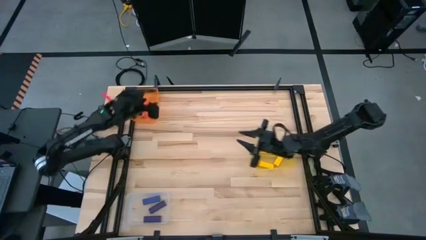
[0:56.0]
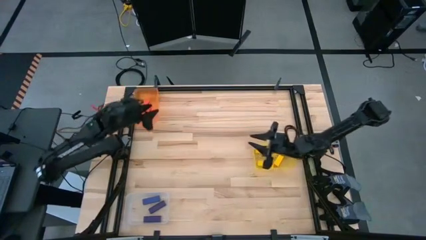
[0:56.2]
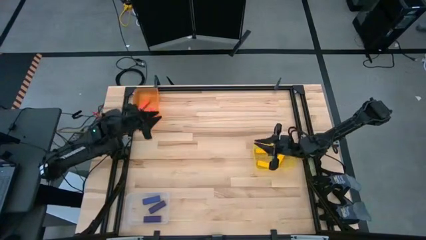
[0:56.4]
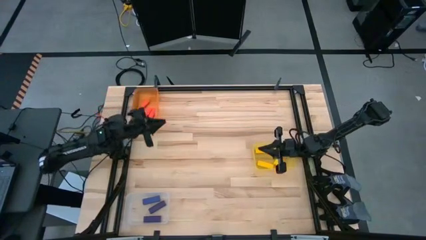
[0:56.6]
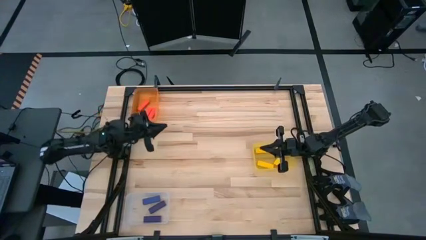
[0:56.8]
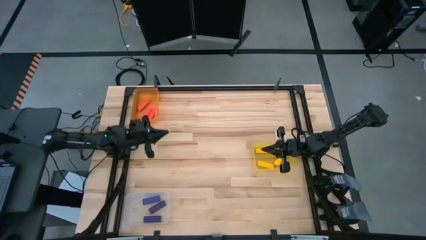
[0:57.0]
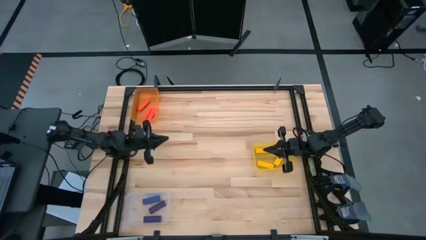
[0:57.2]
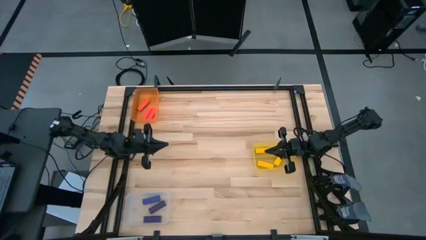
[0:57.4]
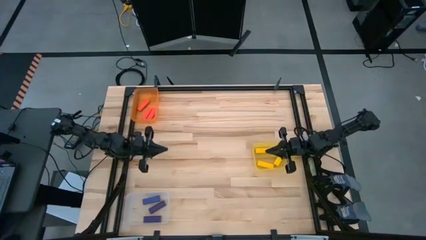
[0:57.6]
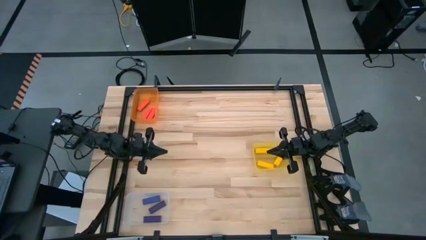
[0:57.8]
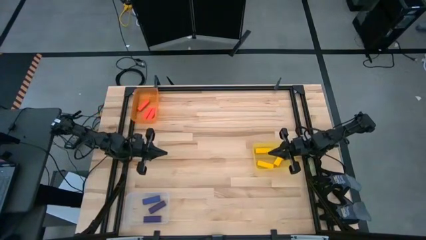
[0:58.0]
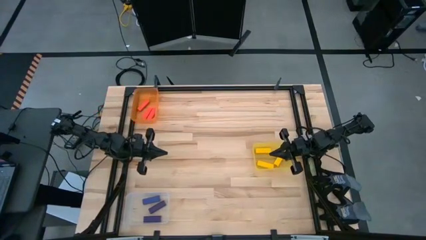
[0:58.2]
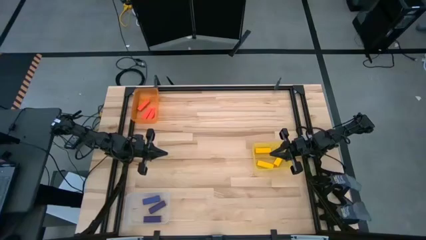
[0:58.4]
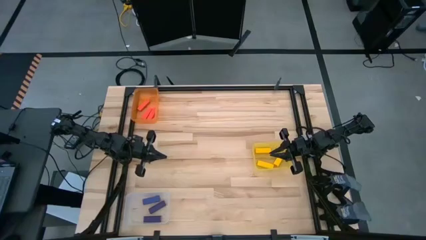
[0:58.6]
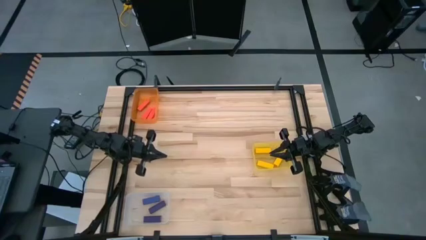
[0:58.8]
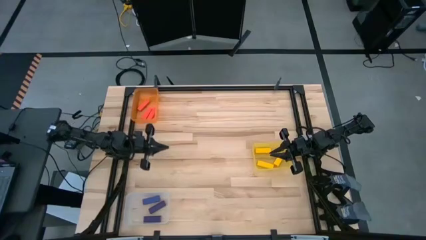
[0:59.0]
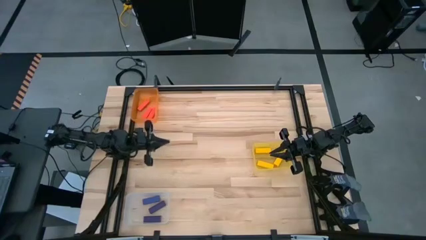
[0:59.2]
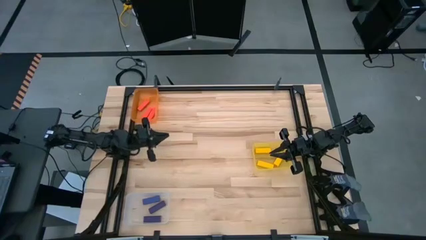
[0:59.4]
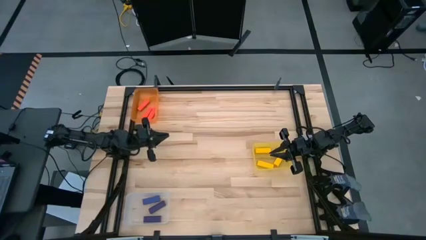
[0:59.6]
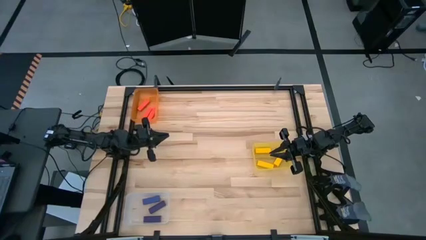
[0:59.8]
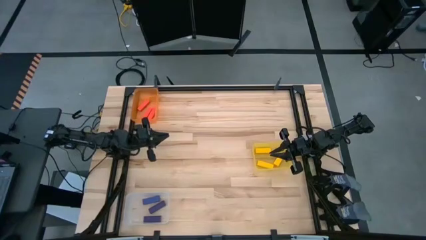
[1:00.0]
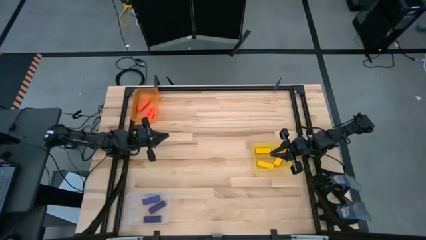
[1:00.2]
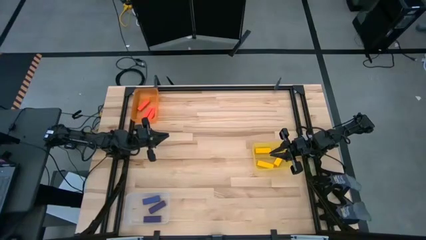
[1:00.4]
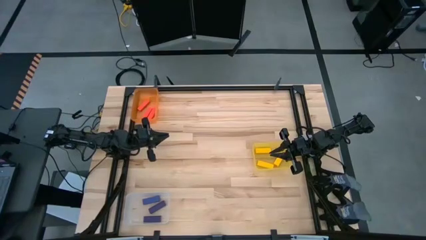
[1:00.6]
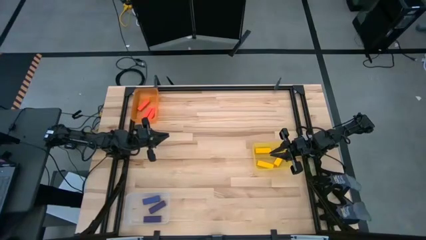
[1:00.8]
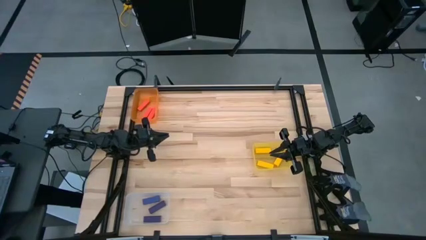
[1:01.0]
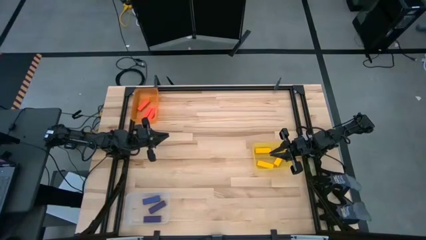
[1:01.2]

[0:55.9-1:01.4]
Task: Sort blocks
Return to Home Position

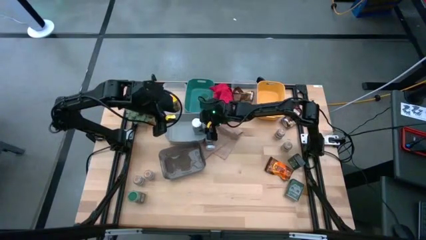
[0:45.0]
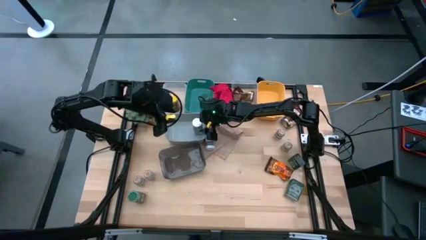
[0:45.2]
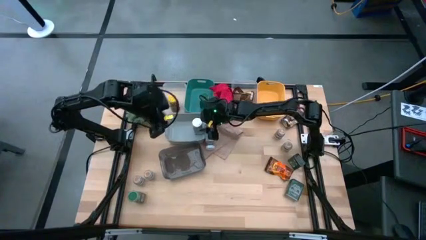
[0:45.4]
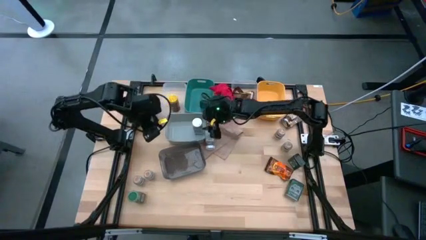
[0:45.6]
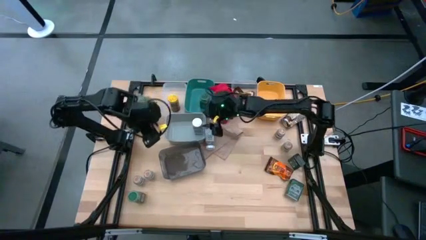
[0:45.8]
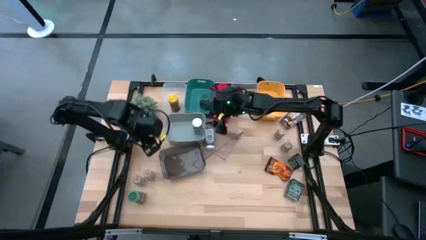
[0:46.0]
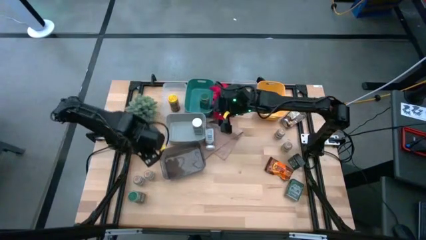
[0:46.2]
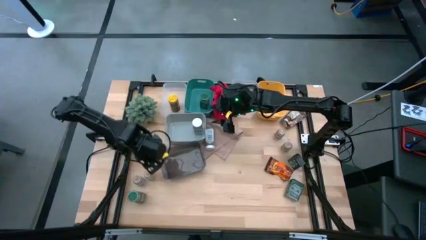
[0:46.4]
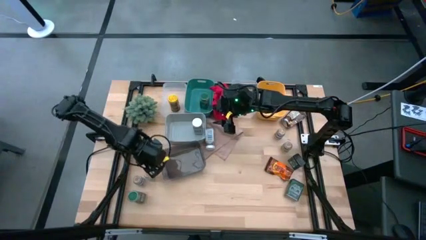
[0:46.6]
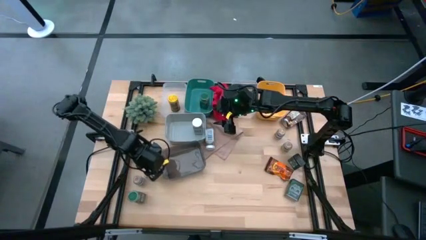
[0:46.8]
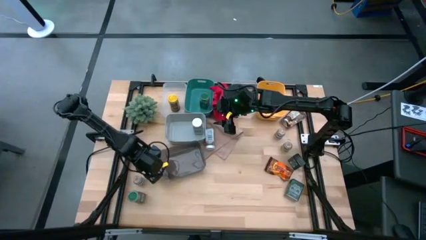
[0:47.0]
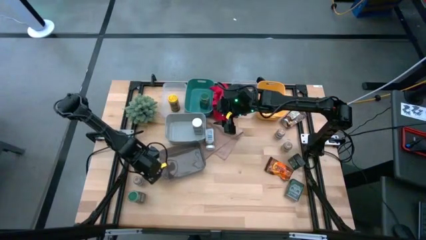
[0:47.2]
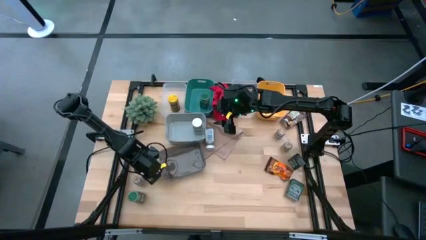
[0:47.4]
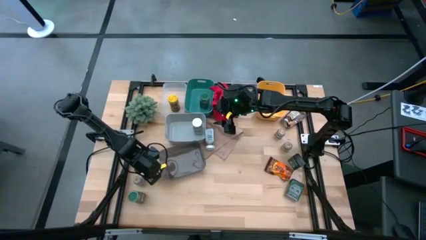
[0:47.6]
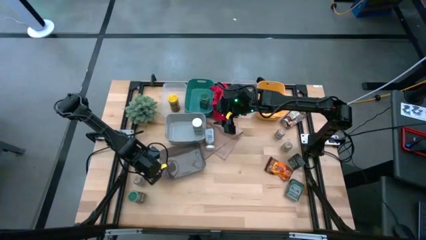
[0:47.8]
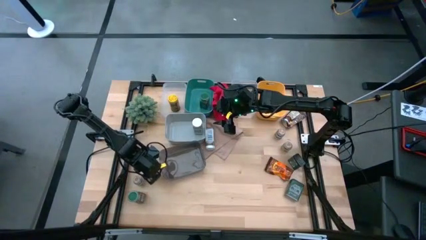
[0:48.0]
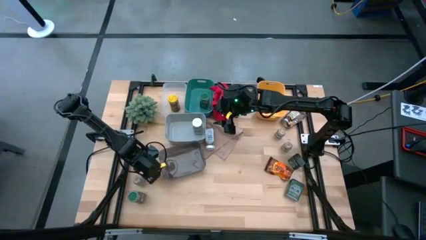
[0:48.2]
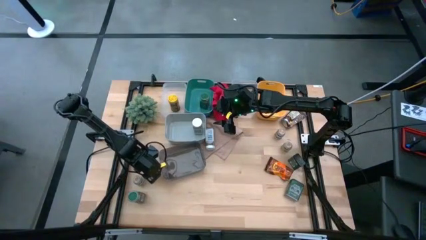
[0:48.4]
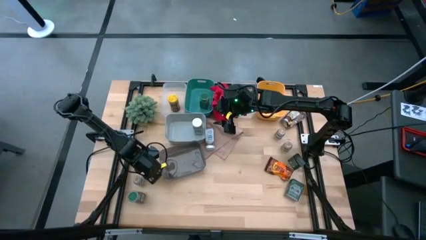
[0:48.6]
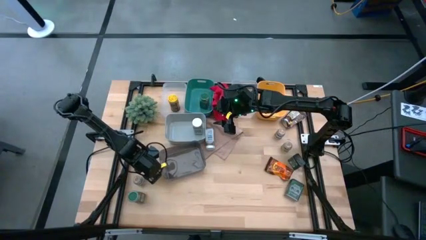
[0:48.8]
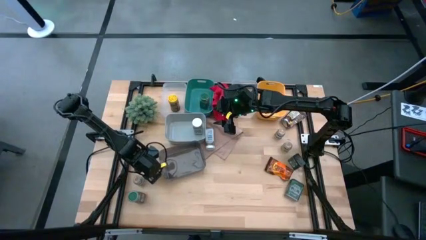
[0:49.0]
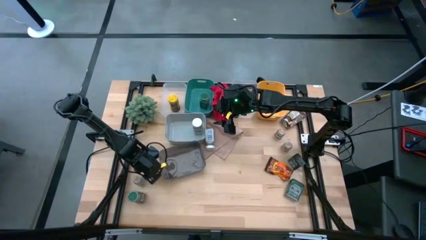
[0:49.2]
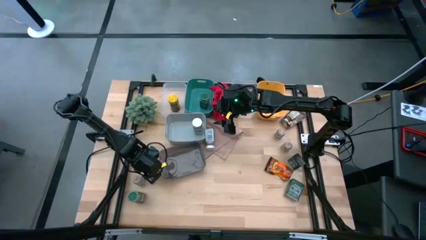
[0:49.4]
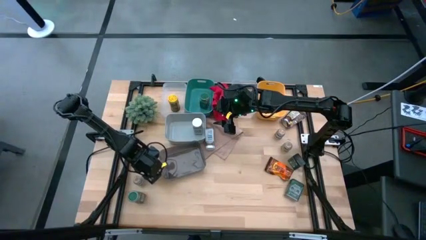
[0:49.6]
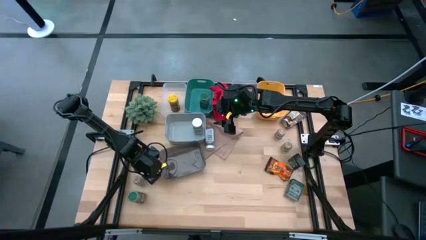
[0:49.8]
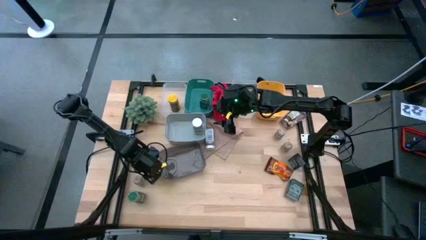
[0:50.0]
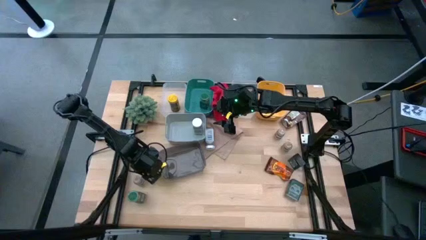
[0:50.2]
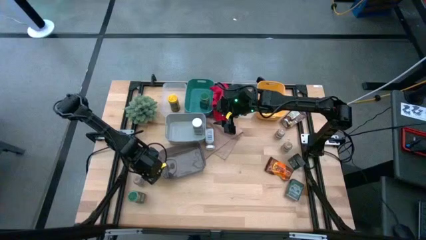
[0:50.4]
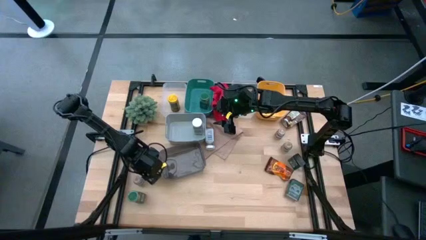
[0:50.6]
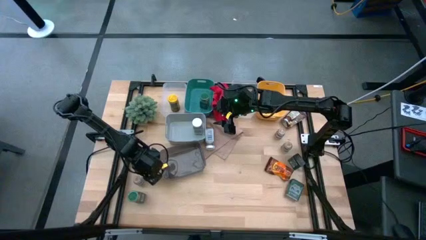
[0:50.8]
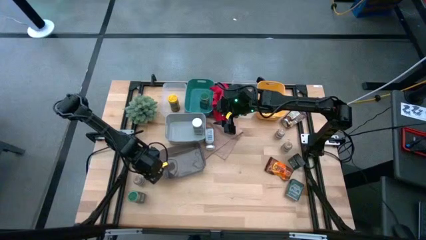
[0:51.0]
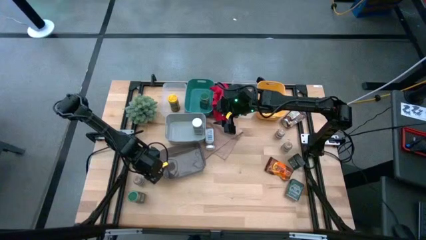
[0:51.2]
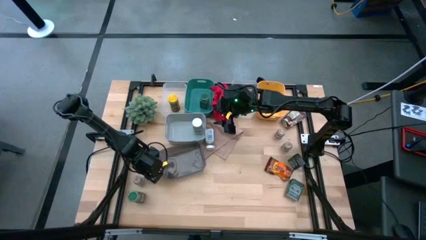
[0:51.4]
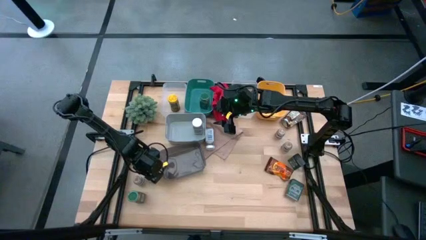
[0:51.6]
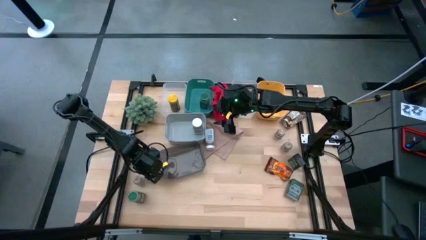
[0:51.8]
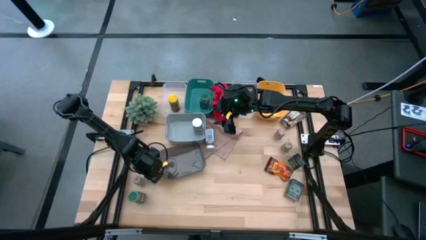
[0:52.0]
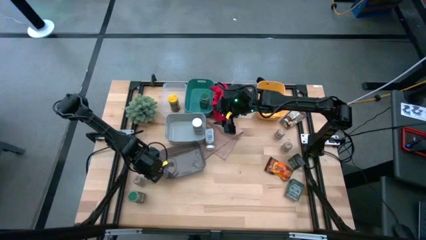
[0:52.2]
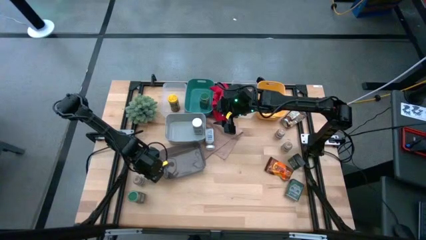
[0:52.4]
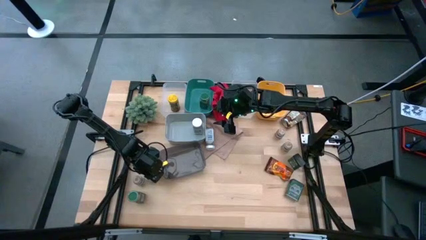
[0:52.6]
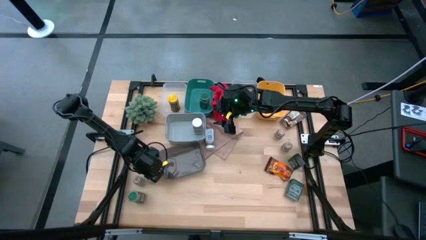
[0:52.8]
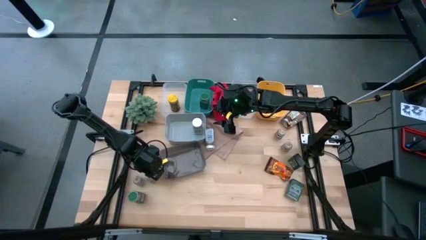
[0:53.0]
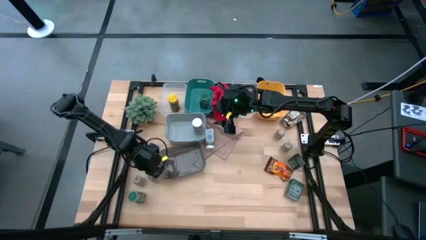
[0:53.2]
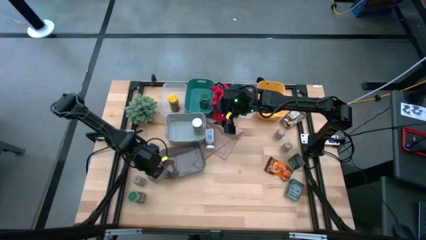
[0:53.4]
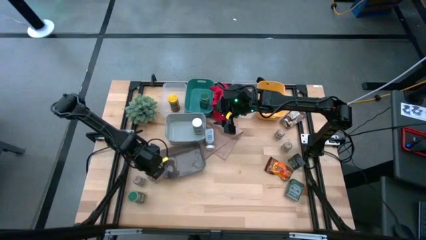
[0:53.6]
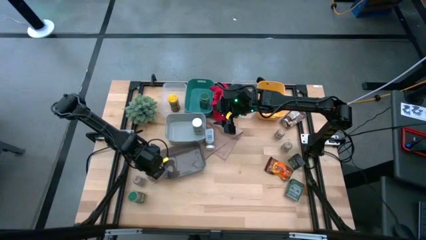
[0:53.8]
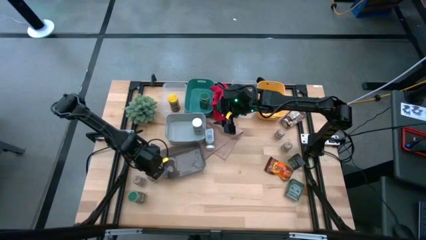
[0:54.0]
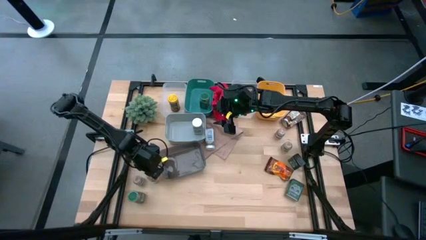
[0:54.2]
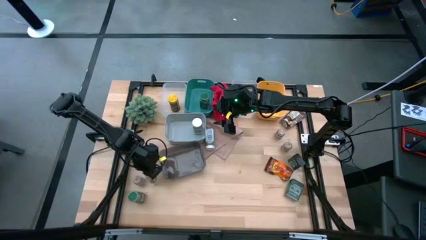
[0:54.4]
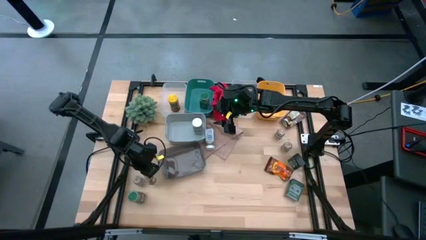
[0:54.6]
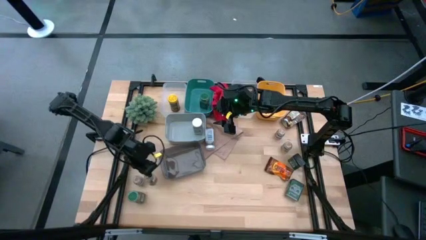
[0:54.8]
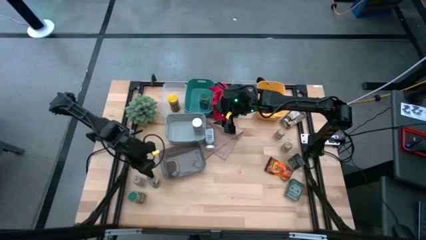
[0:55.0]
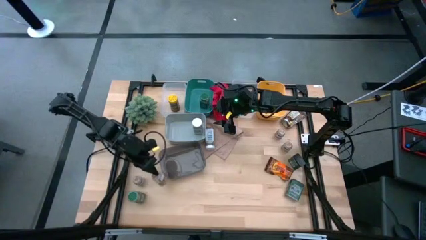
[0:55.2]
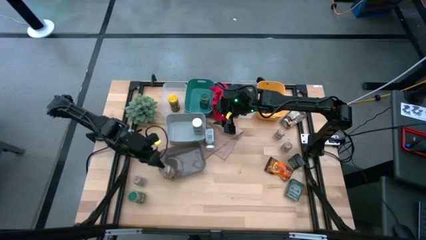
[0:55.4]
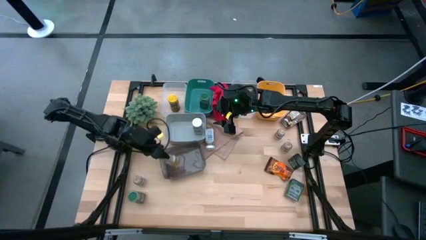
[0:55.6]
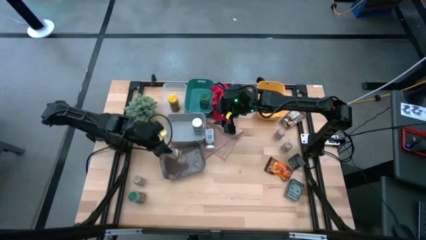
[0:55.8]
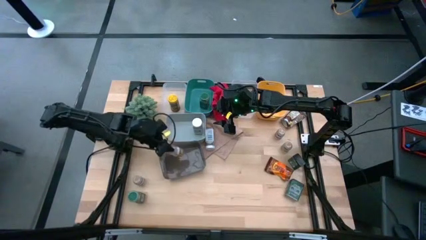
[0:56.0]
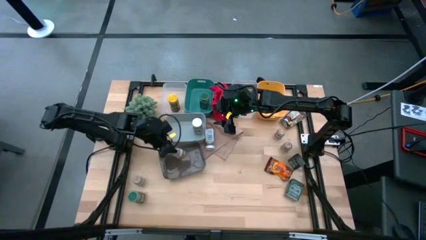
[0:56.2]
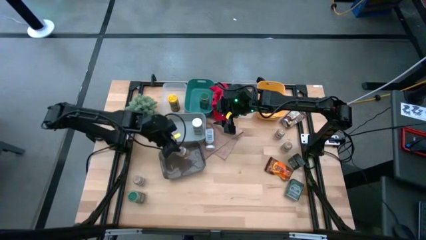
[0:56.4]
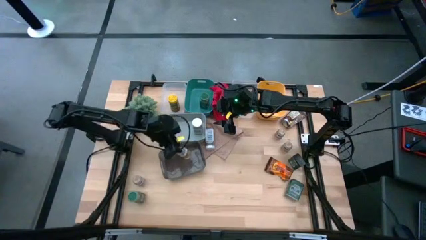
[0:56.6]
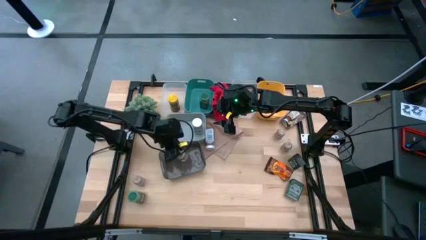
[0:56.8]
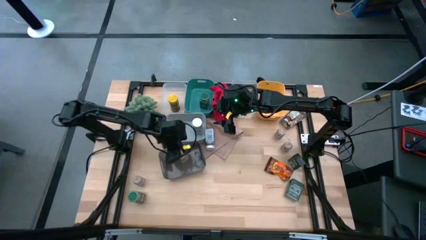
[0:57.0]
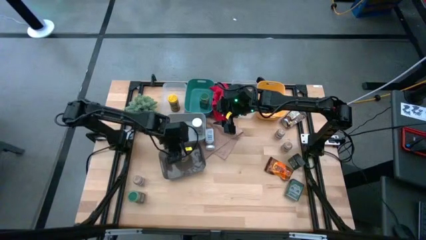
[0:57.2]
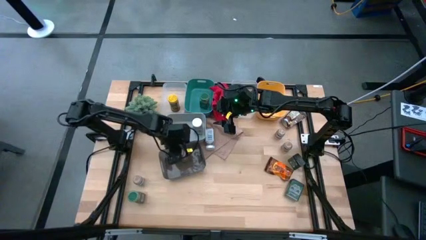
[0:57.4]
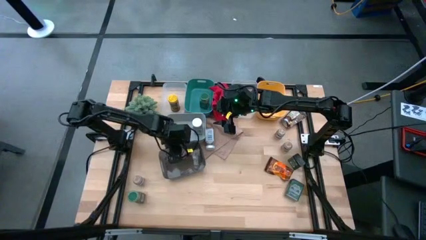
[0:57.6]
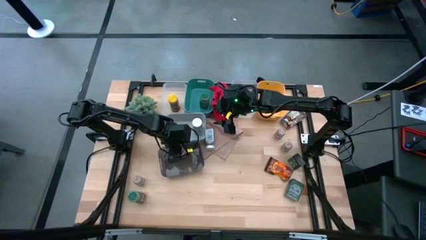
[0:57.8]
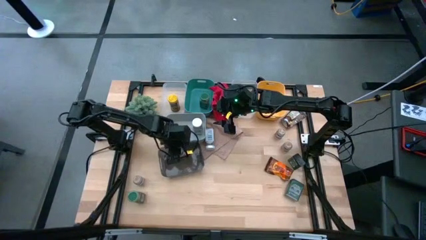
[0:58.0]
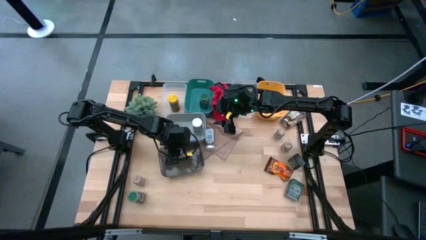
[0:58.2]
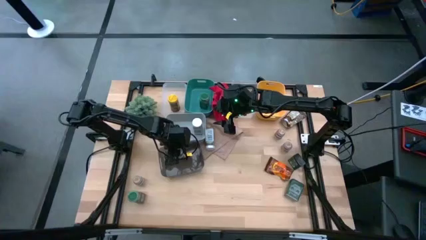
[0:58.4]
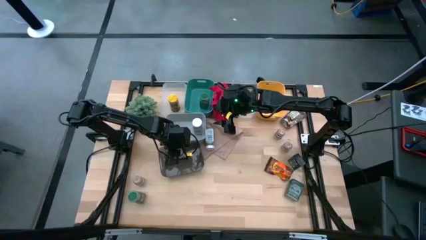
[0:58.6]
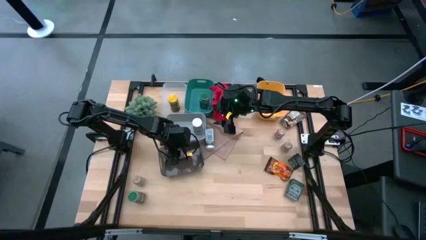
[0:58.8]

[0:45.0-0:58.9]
Task: Sort spices by type
Put the brown seasoning bottle into the black bin
